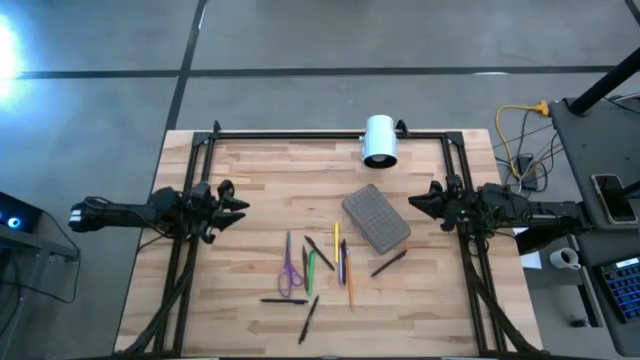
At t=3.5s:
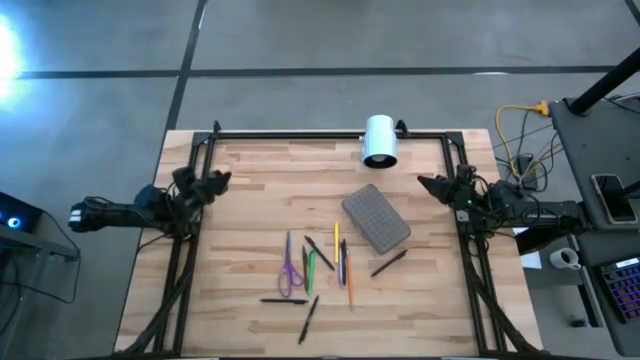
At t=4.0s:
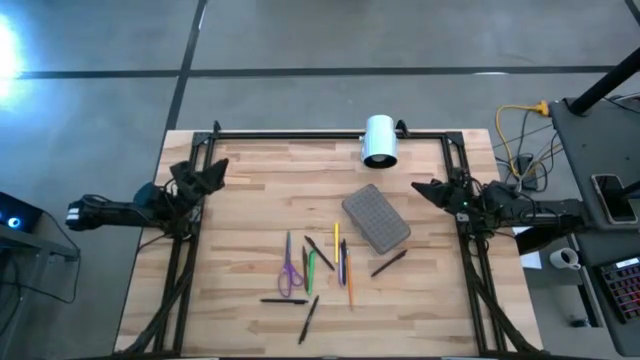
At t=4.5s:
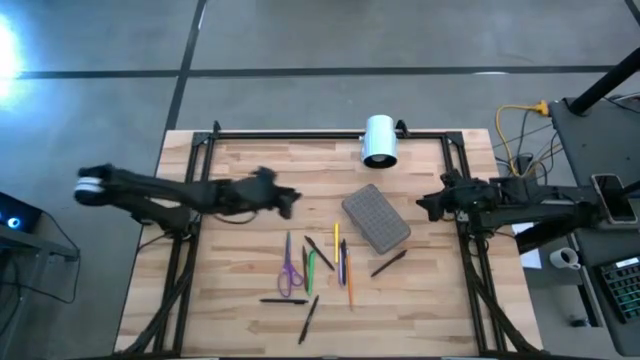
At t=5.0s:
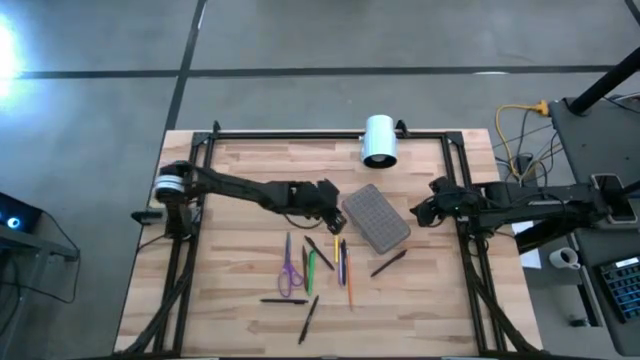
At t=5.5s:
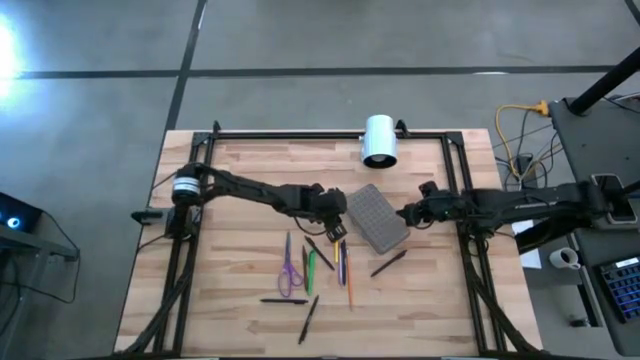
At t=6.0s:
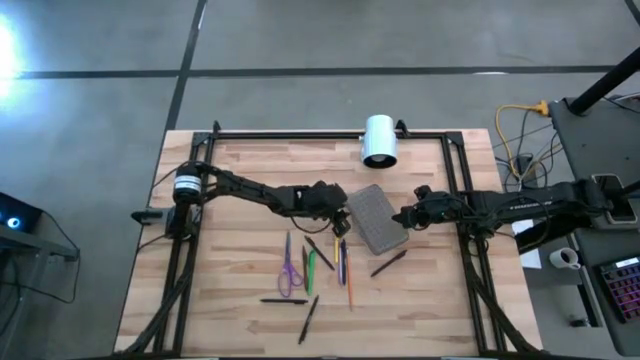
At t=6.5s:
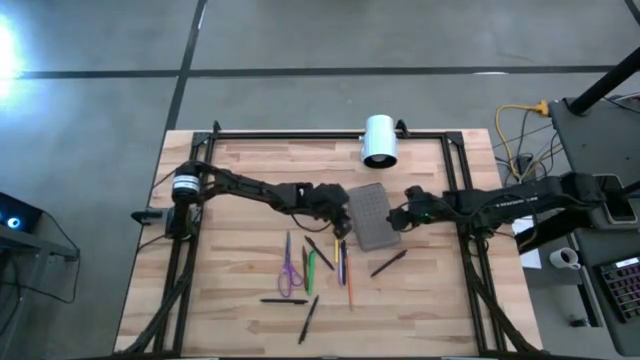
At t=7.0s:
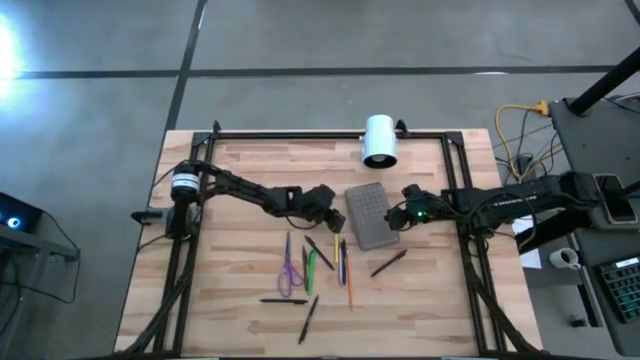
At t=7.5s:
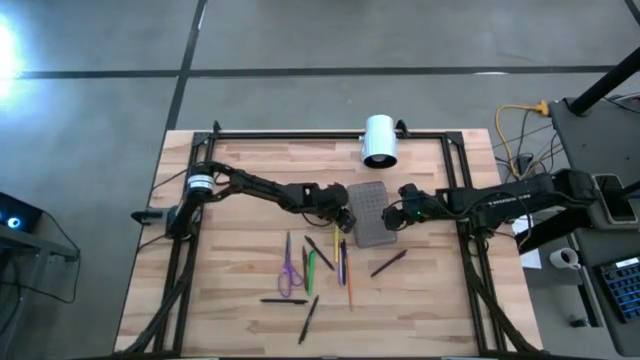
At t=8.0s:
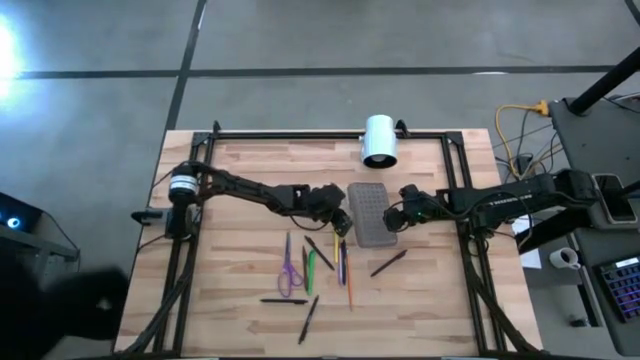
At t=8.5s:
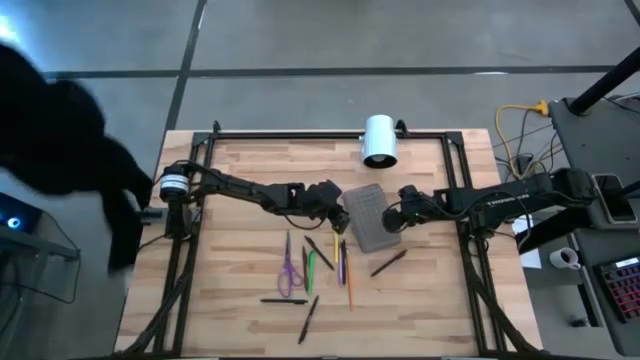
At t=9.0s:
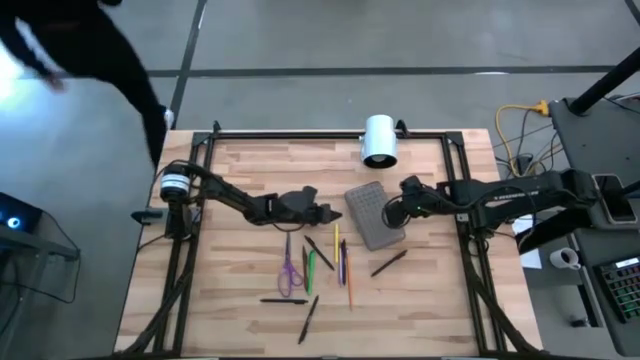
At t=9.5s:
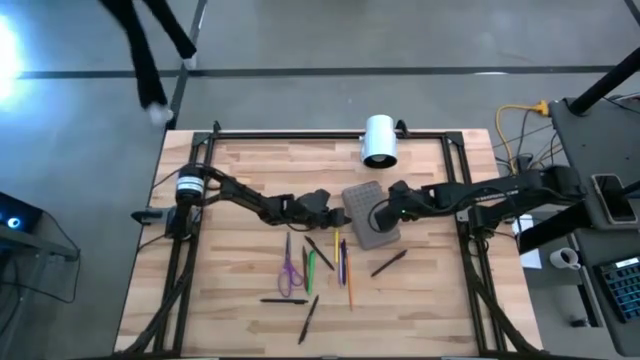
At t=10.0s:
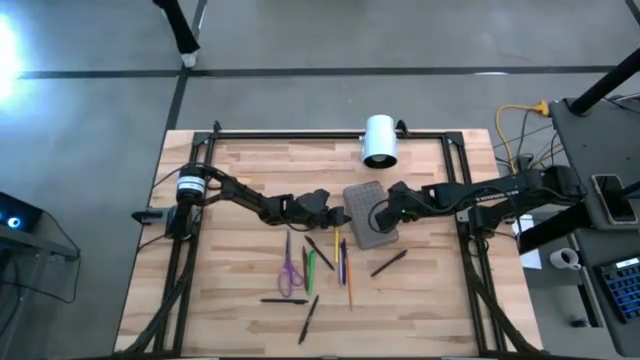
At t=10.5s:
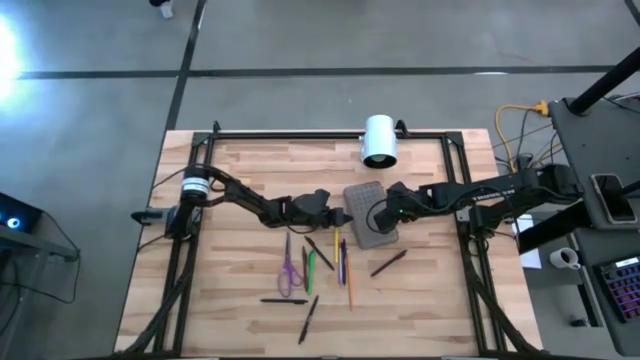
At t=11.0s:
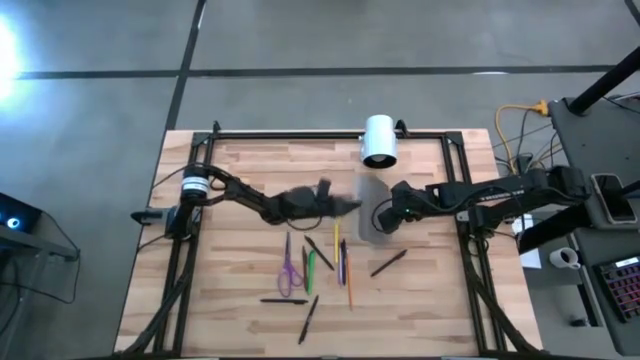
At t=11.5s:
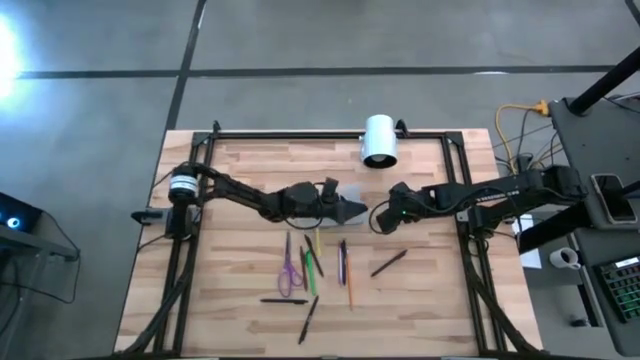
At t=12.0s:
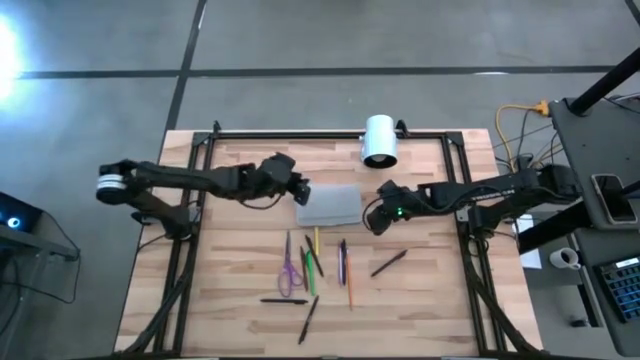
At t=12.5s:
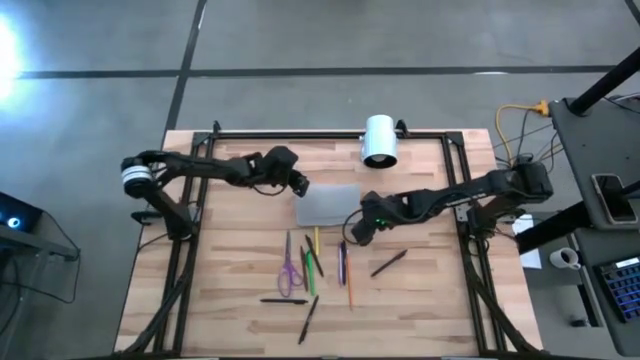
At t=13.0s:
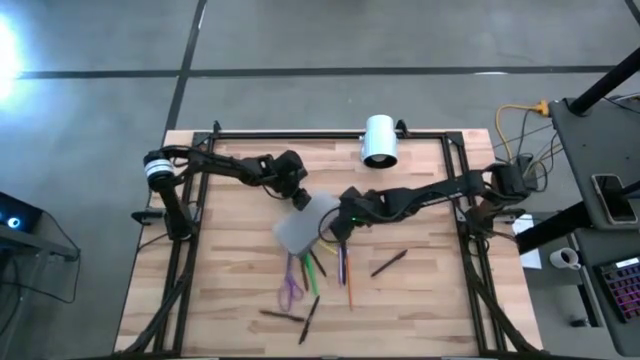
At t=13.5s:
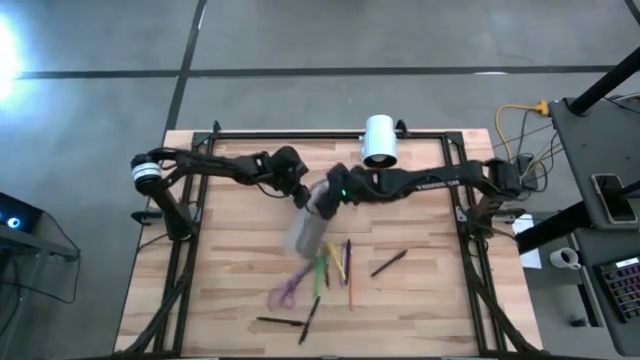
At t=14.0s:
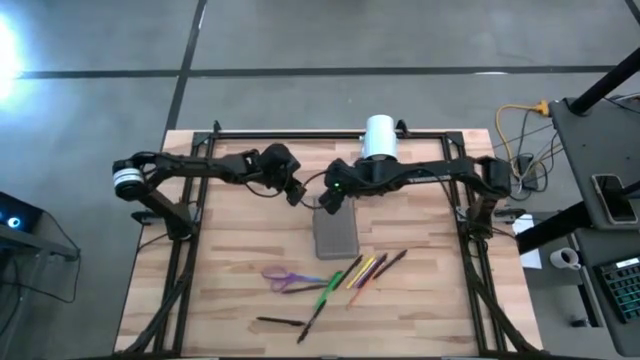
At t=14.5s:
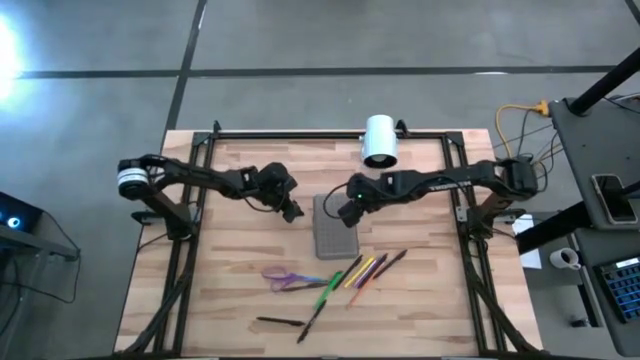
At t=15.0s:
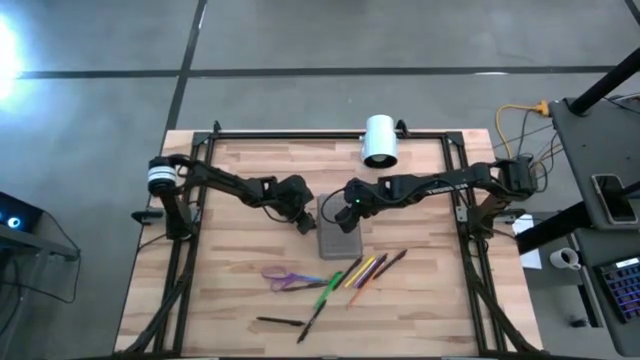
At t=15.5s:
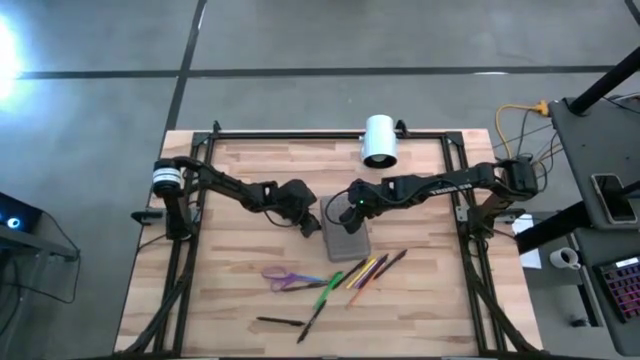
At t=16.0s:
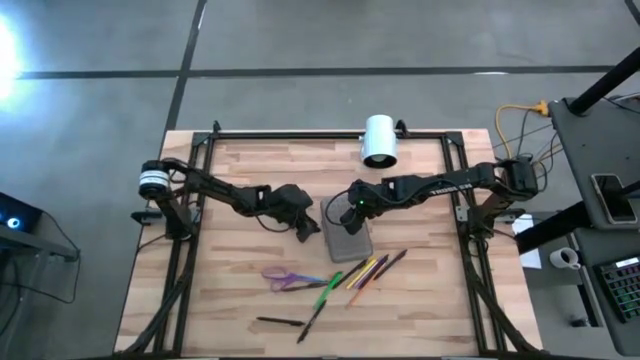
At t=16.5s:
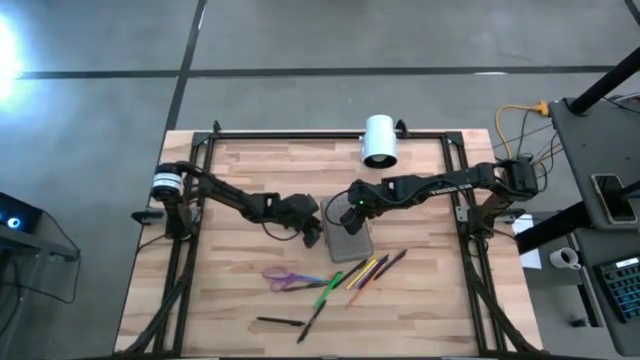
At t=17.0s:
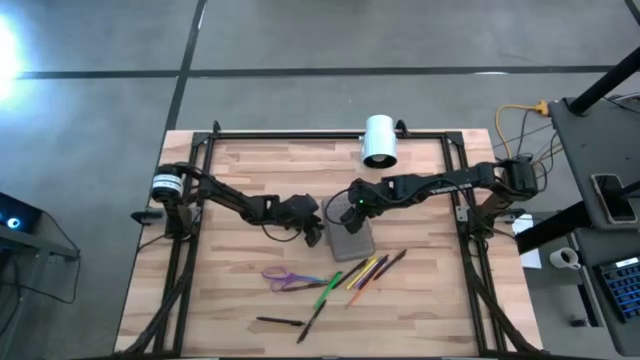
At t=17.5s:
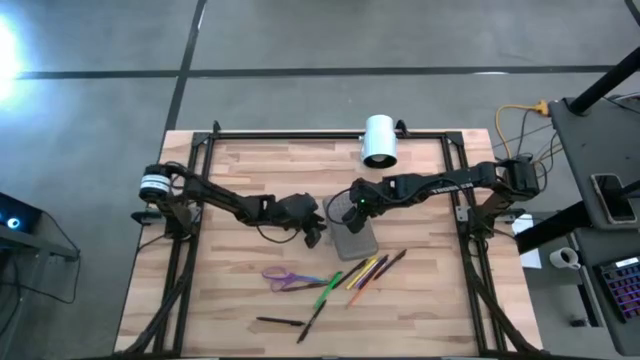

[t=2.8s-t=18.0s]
Task: Pick & place school supplies into a supply box
Open the black supply box
